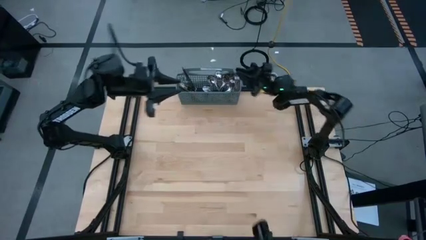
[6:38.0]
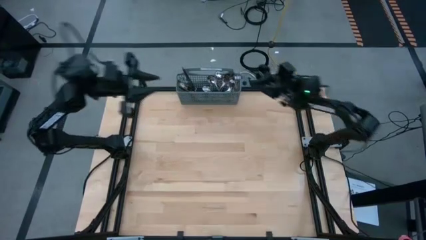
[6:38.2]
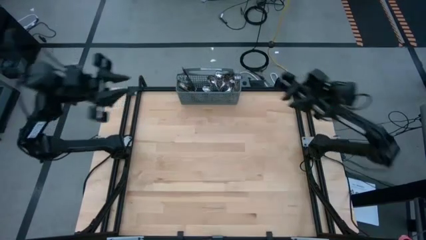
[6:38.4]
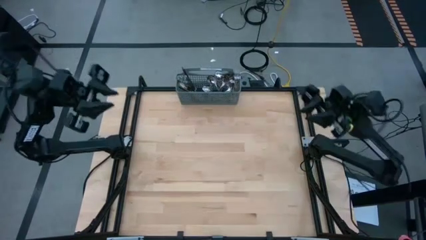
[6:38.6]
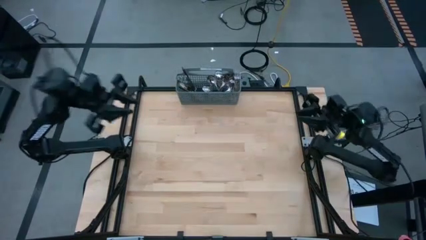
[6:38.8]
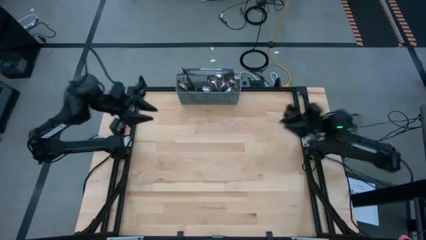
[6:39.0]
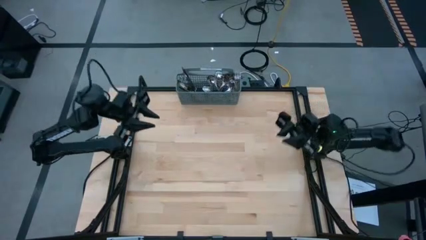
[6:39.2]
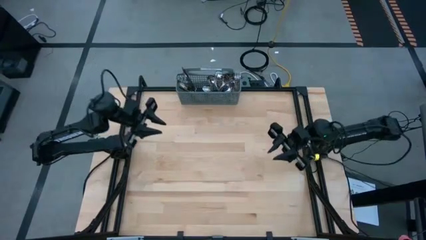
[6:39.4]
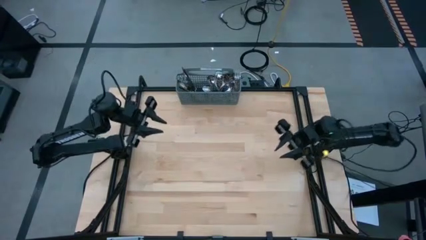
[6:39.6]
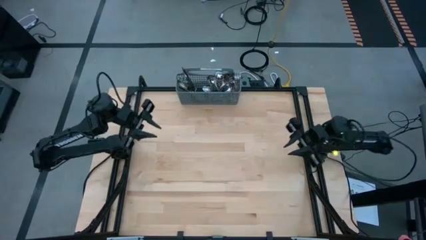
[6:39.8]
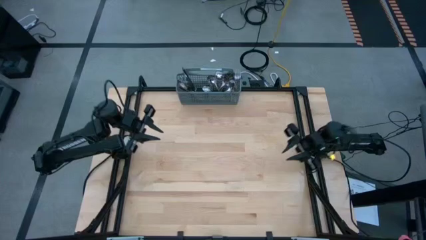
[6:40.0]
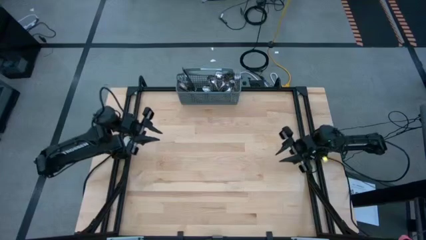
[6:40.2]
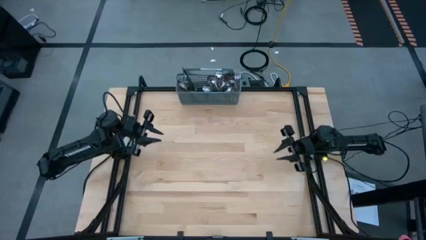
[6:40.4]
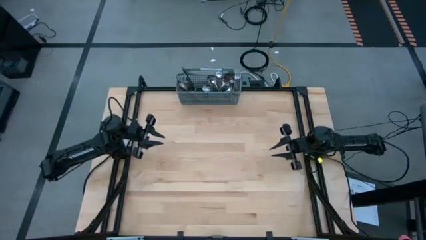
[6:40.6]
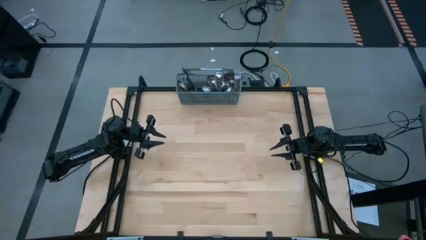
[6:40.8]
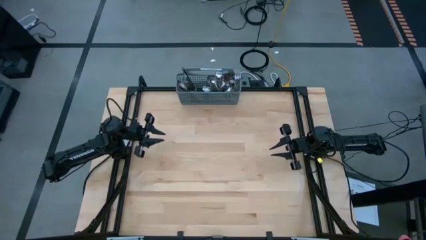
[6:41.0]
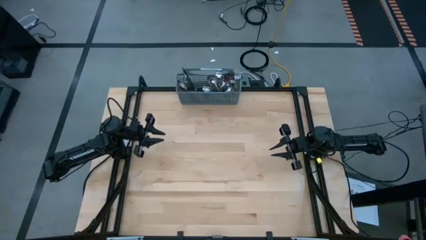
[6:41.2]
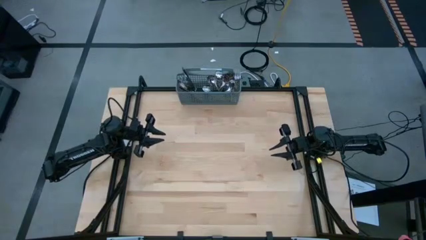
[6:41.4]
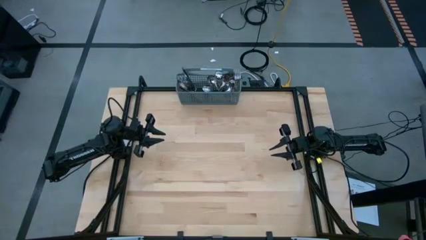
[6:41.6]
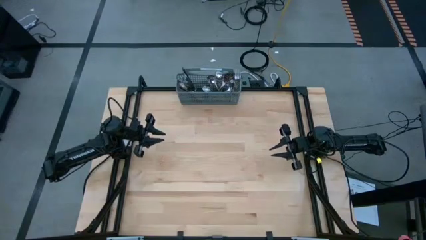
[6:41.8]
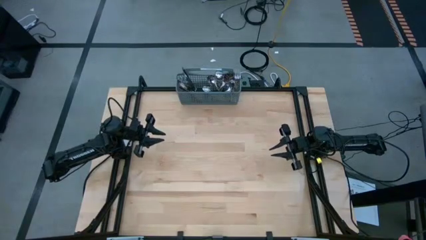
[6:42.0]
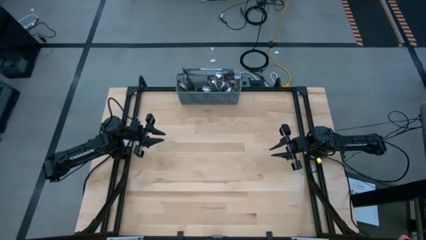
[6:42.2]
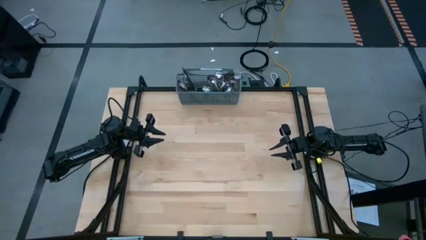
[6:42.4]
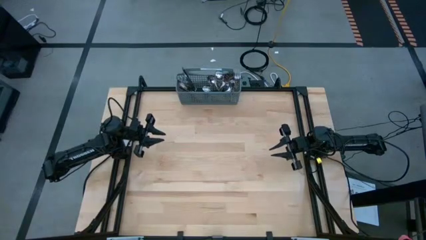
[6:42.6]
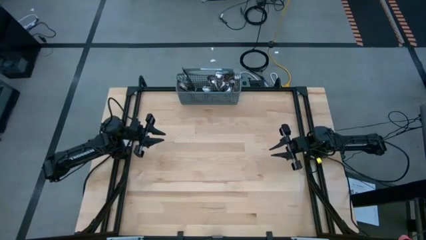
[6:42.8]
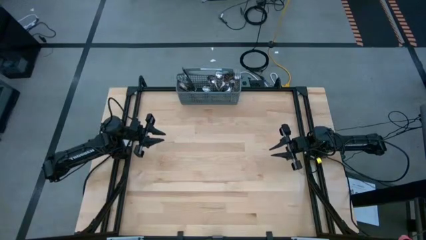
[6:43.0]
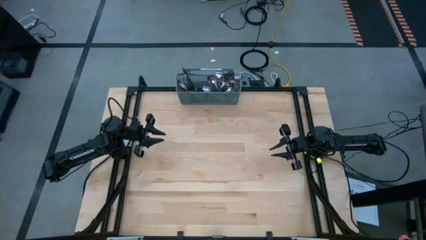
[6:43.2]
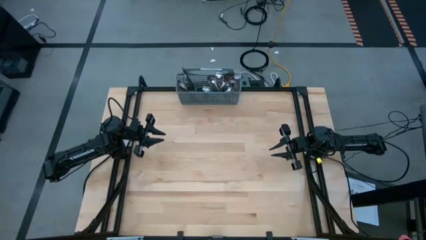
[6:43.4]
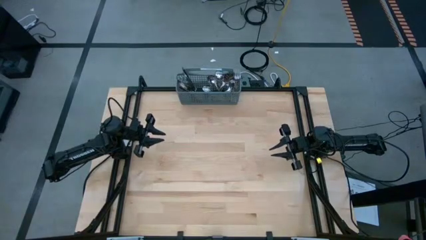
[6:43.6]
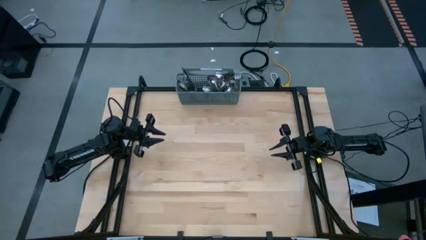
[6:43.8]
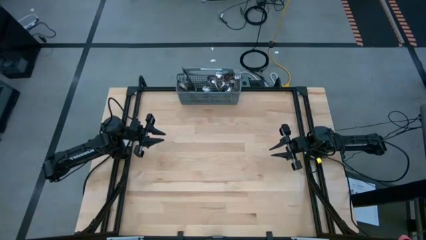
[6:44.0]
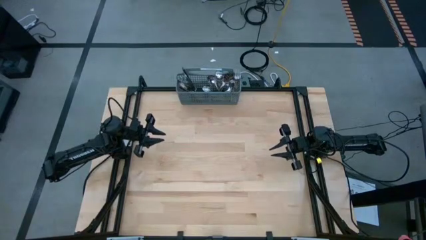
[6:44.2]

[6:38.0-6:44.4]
Task: Sort silverware
Return to Home Position

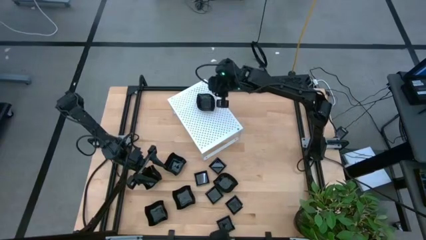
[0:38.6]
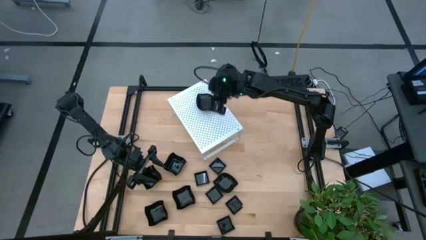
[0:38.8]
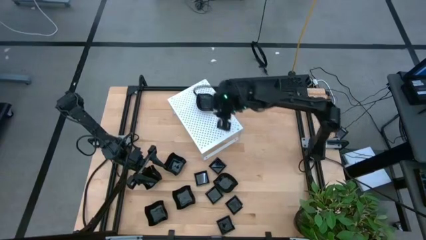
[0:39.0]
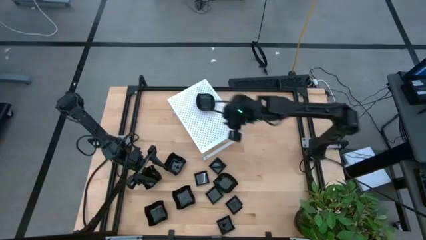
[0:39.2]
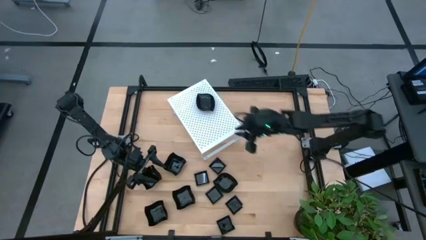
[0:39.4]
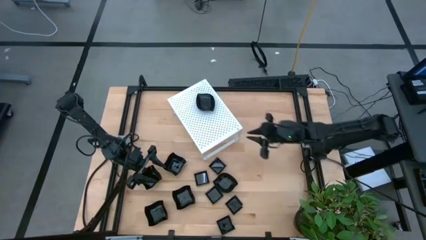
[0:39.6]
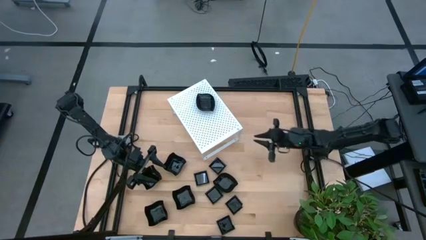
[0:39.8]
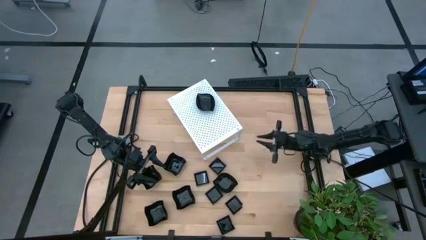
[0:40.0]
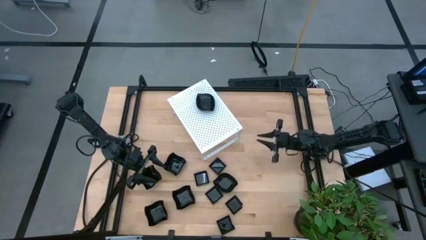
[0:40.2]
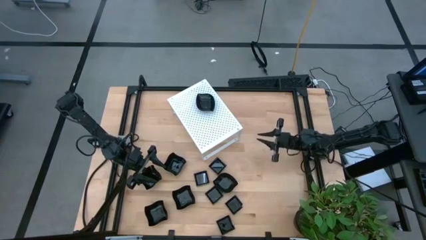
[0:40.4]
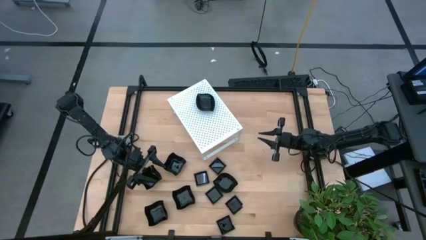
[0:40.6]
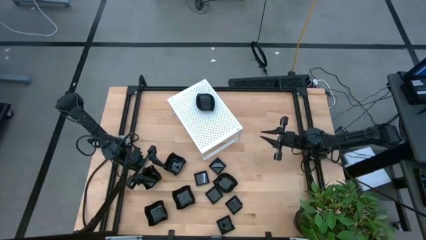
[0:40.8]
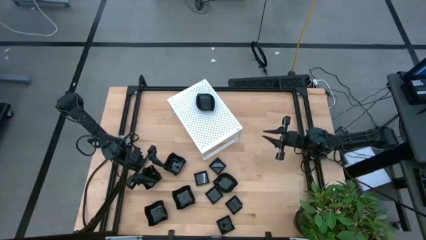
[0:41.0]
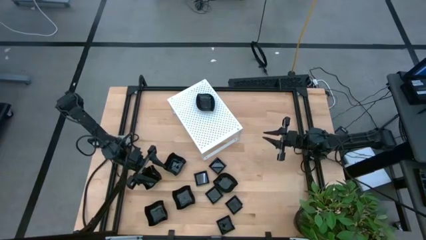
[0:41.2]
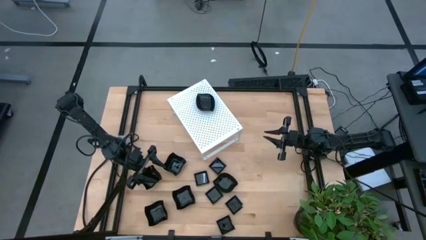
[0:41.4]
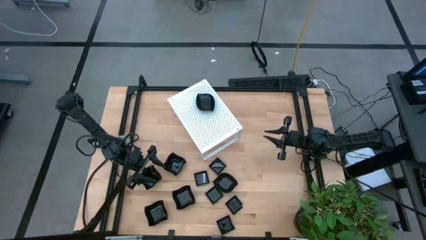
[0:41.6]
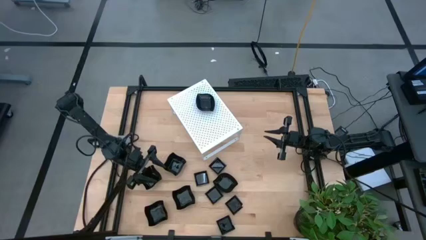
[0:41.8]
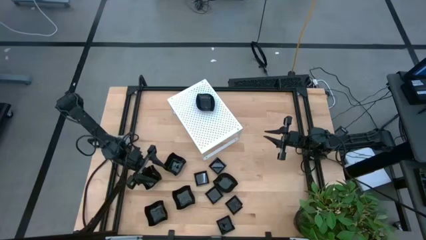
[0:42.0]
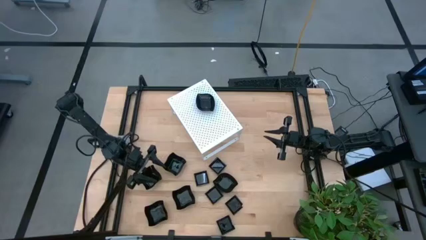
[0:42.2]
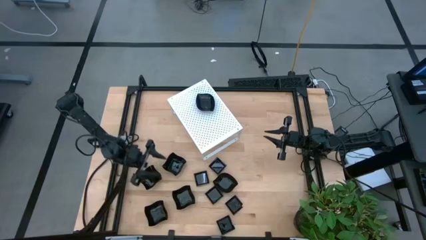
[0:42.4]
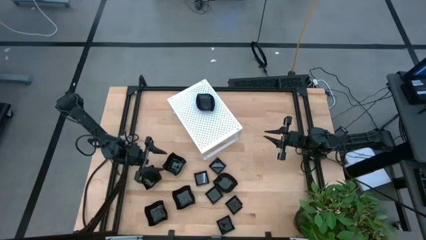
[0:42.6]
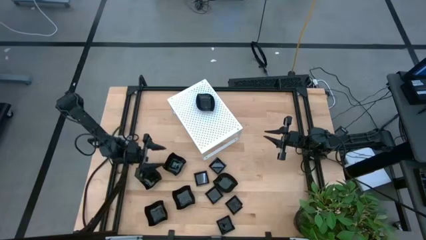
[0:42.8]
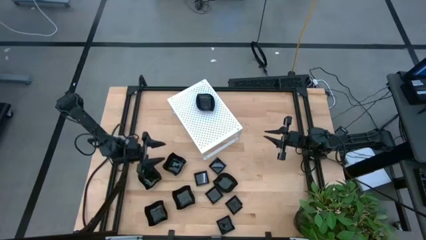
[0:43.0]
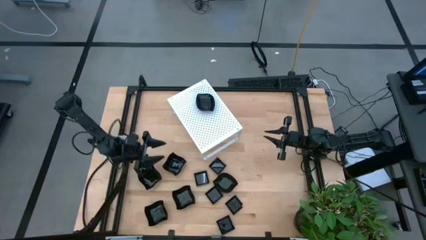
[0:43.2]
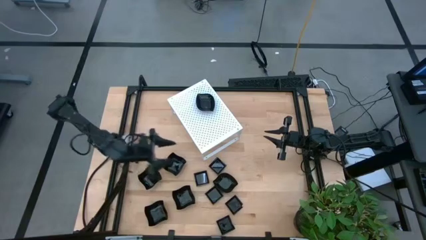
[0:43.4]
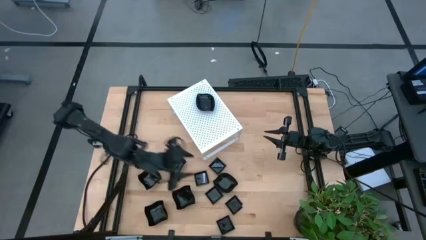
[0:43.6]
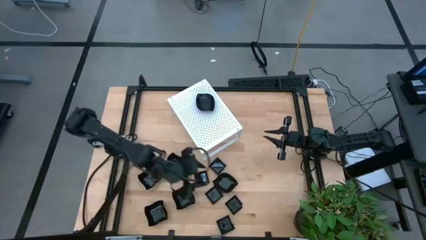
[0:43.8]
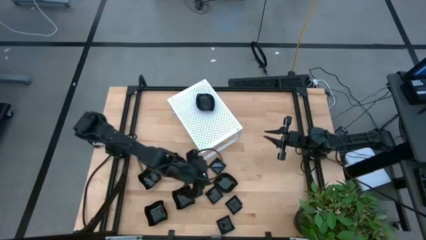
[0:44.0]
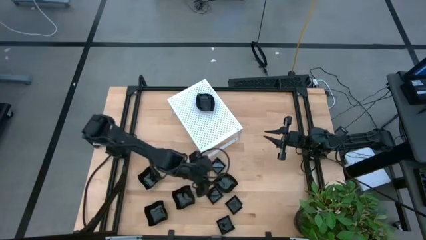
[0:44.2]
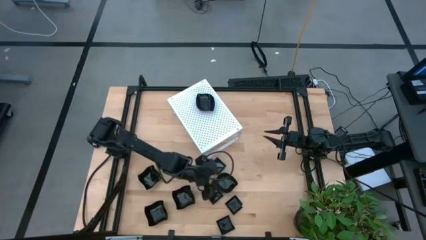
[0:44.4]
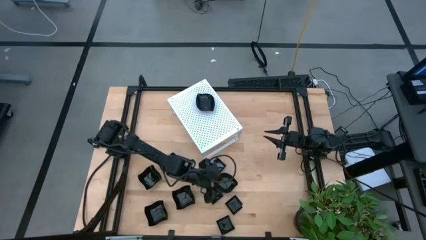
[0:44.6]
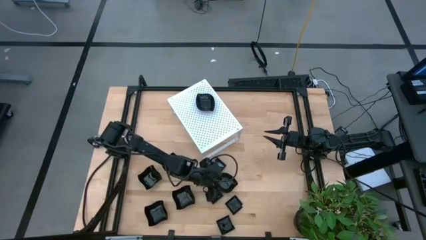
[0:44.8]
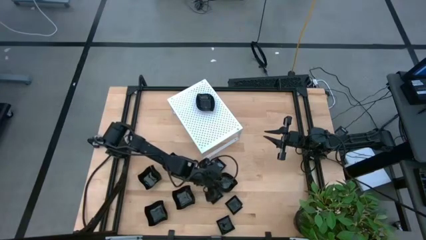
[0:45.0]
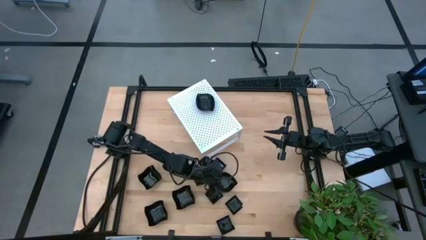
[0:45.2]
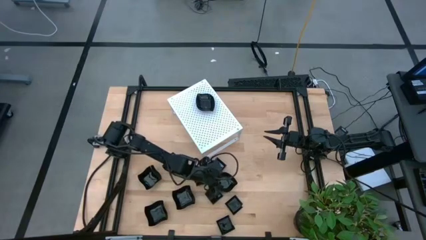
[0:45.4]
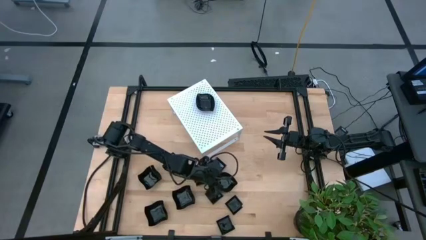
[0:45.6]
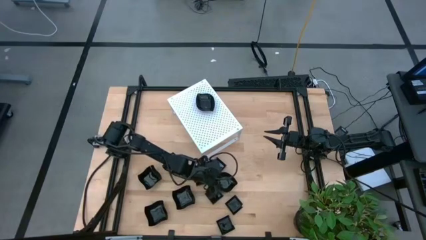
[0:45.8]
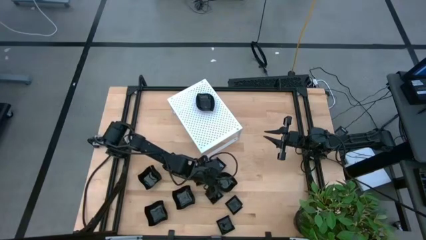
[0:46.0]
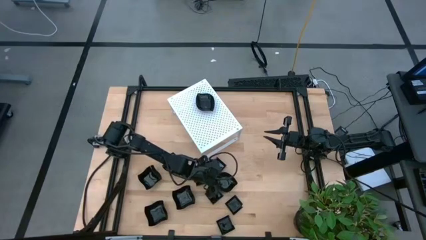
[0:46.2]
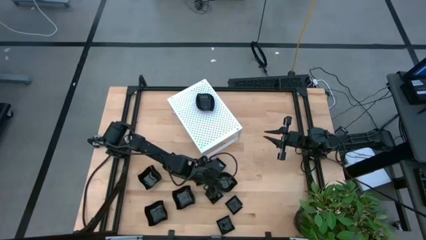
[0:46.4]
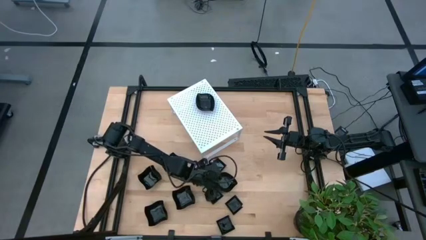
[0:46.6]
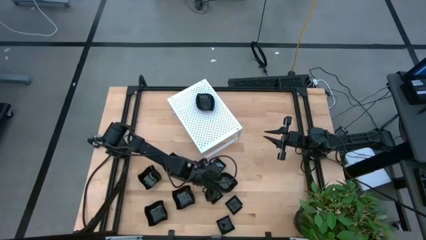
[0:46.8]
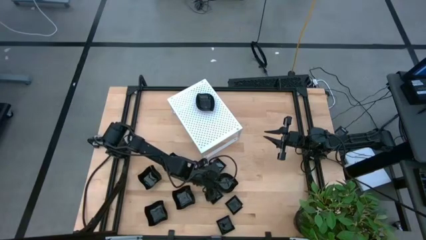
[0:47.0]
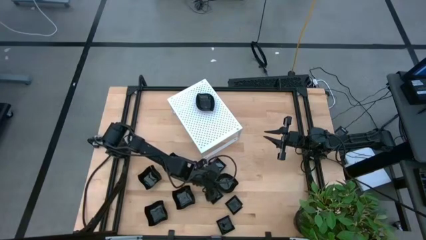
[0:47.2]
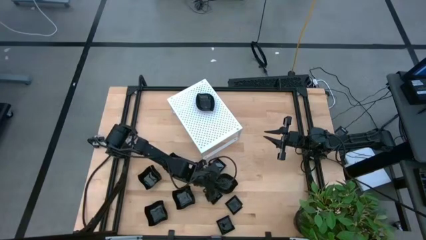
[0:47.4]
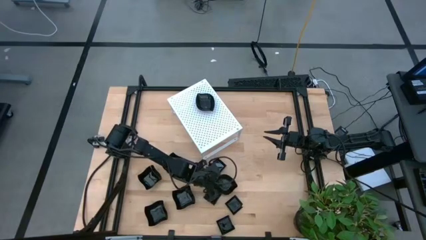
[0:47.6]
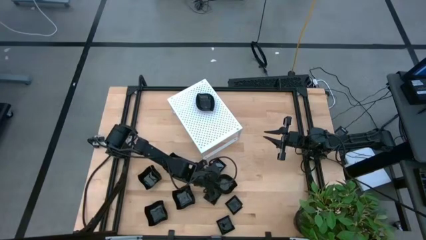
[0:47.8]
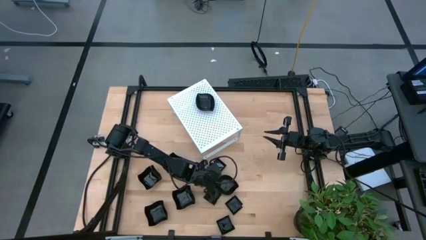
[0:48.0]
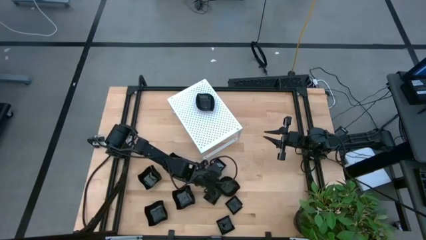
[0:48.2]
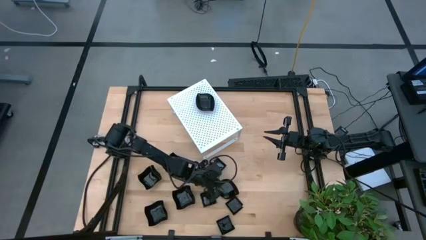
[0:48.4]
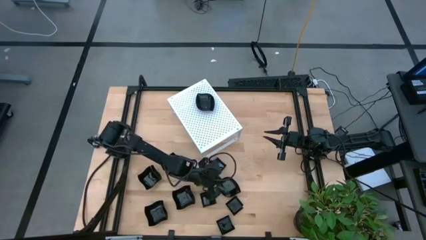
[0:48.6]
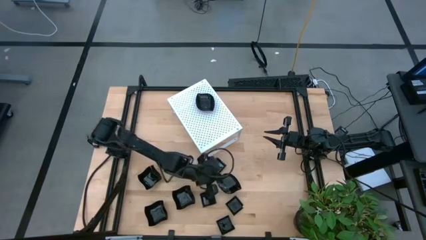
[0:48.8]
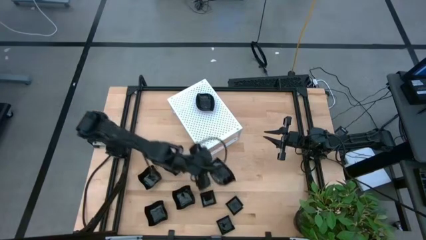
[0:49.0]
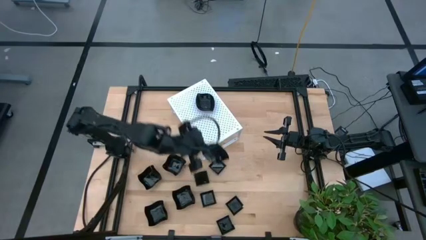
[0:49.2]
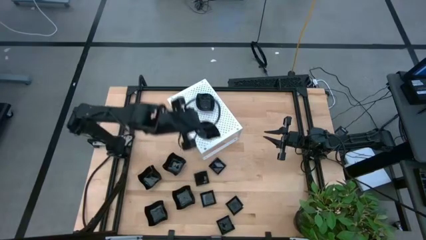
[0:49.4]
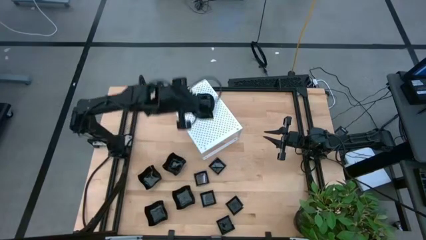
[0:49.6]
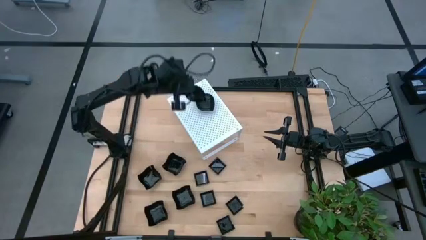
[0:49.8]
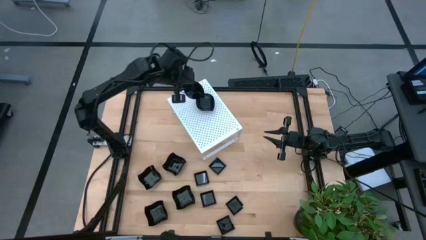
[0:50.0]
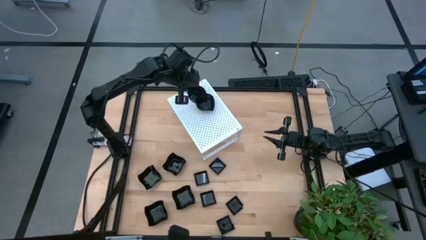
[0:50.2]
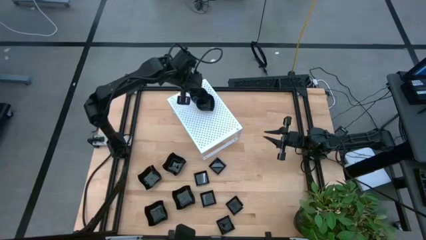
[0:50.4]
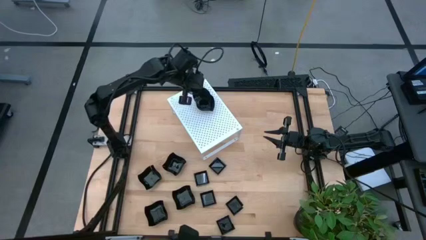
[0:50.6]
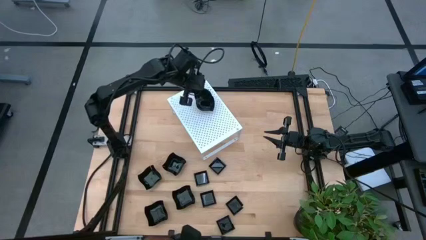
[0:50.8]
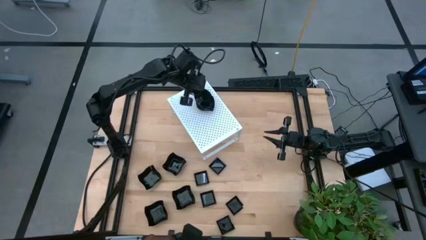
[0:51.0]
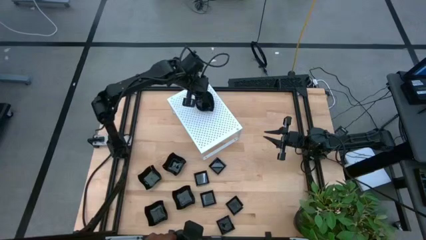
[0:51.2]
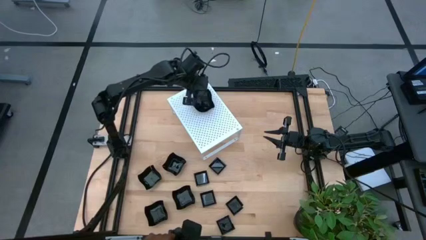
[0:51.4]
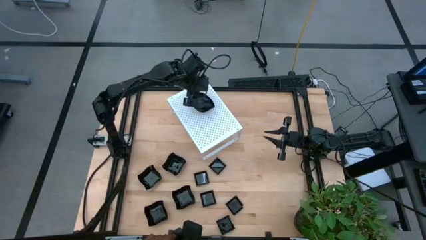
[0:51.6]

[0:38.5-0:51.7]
Task: Pick & Place Mini shaped plates
Stack the leaf-shaped plate on top of the stacked leaf-shaped plates on the shelf
